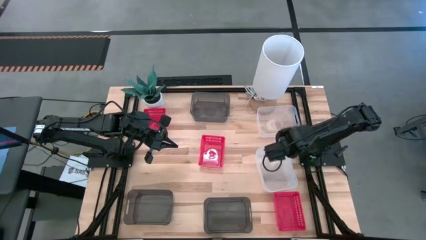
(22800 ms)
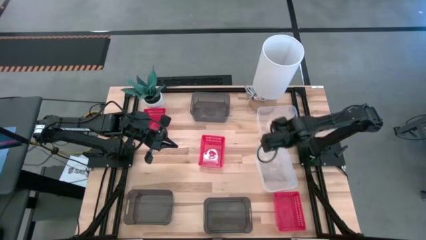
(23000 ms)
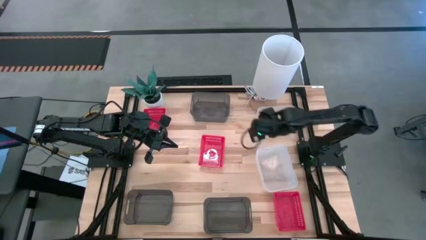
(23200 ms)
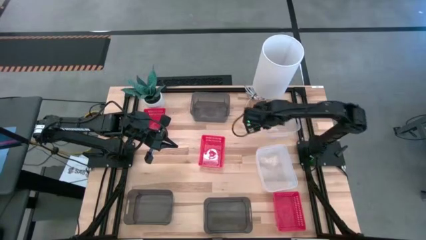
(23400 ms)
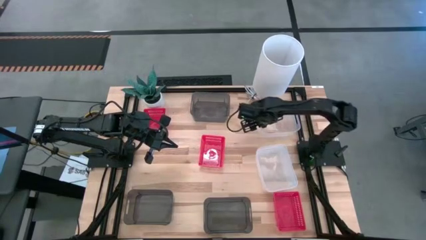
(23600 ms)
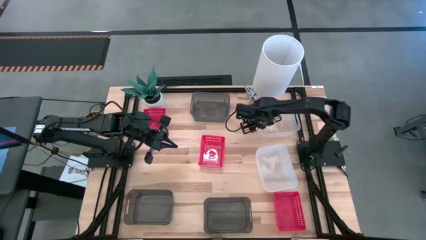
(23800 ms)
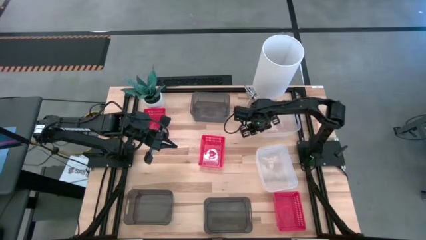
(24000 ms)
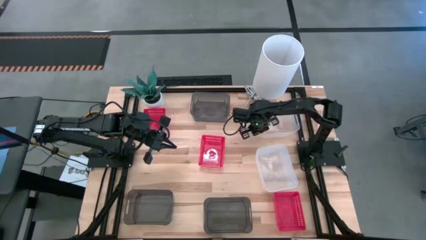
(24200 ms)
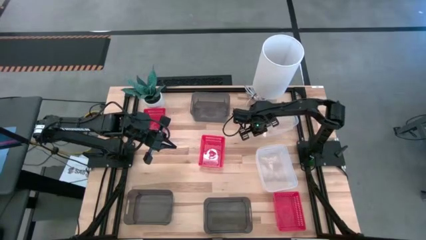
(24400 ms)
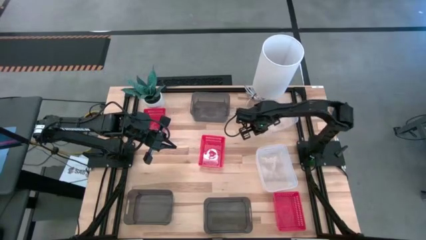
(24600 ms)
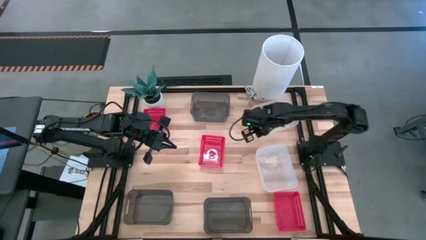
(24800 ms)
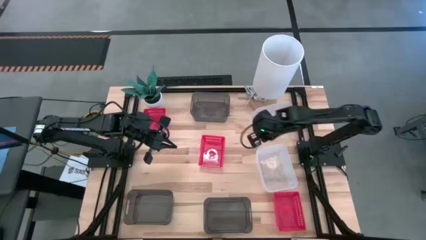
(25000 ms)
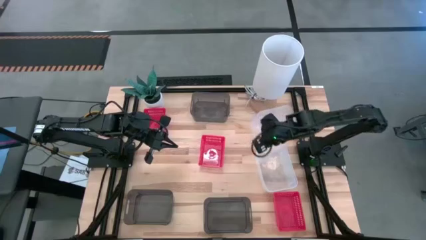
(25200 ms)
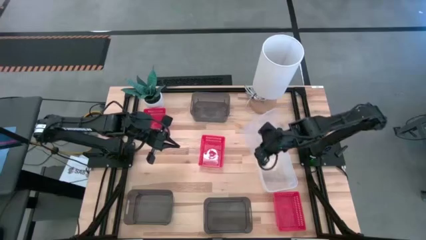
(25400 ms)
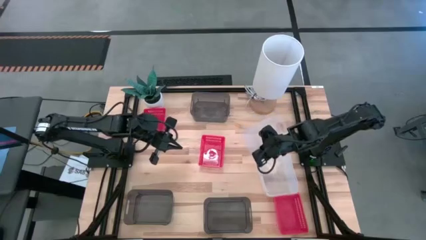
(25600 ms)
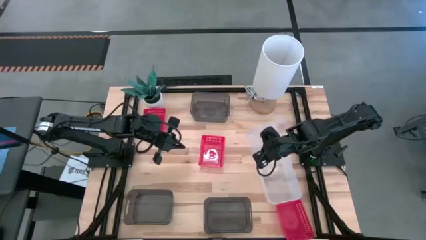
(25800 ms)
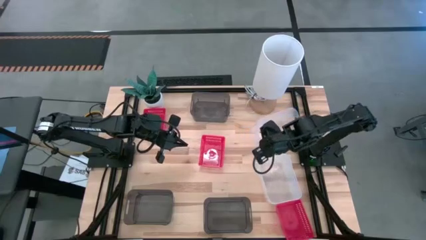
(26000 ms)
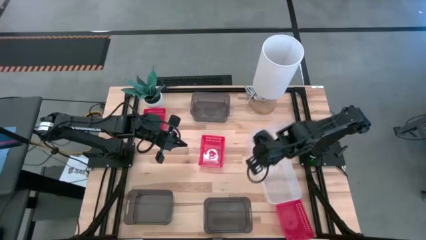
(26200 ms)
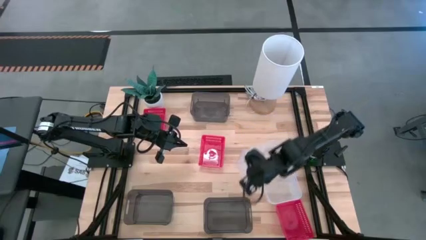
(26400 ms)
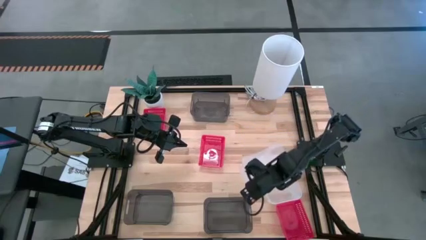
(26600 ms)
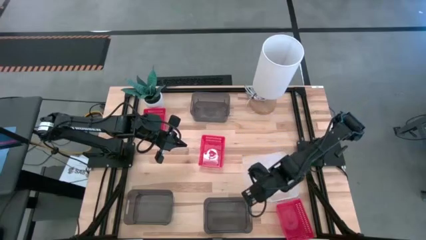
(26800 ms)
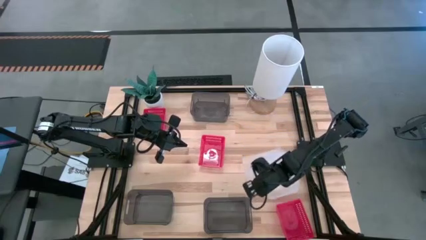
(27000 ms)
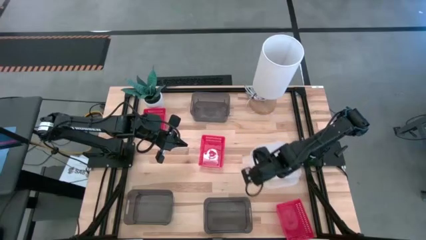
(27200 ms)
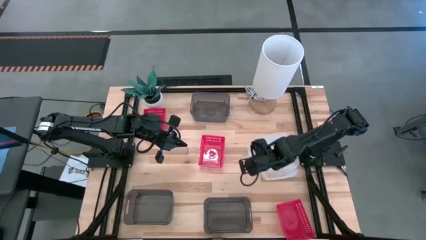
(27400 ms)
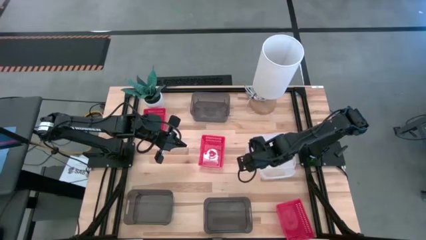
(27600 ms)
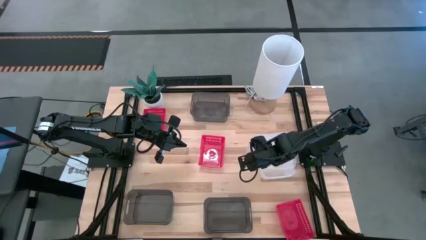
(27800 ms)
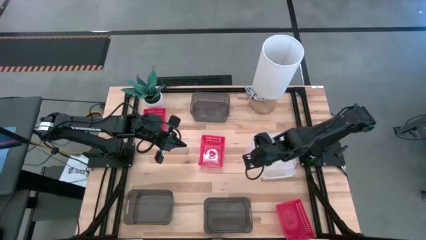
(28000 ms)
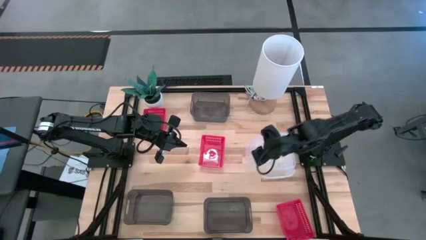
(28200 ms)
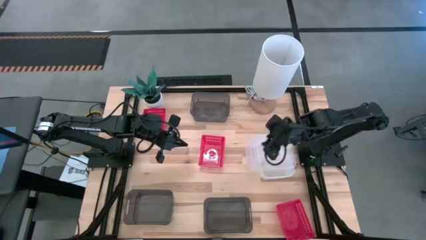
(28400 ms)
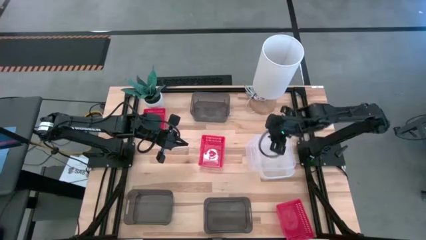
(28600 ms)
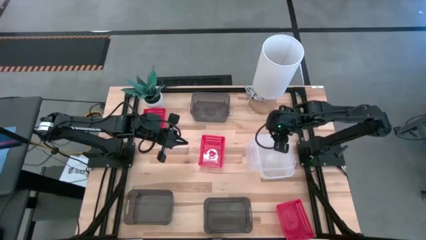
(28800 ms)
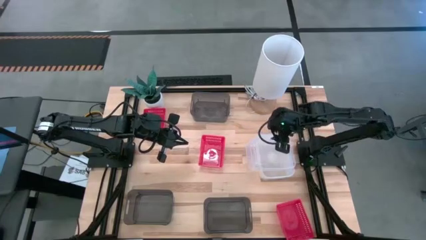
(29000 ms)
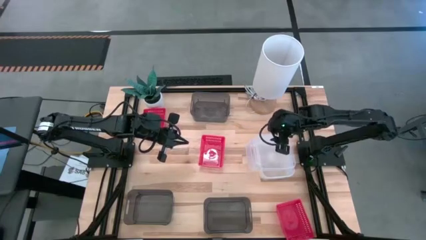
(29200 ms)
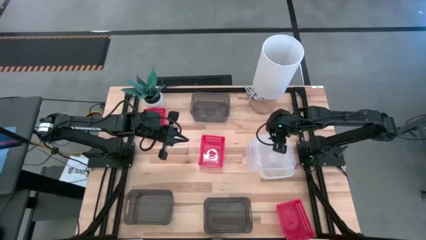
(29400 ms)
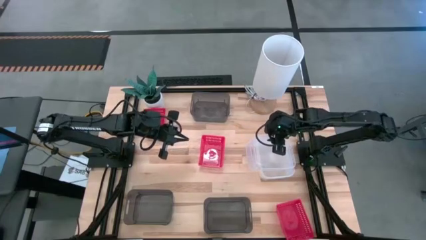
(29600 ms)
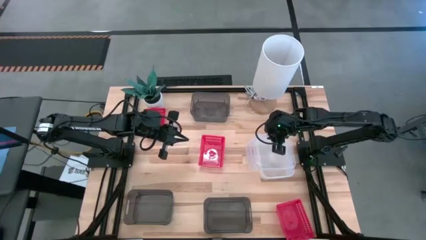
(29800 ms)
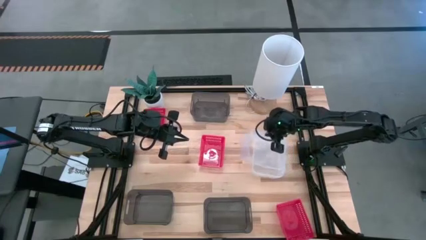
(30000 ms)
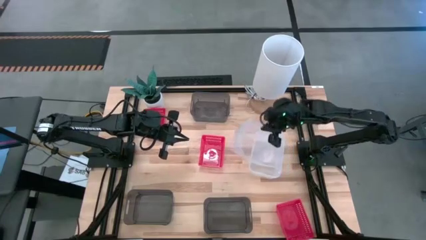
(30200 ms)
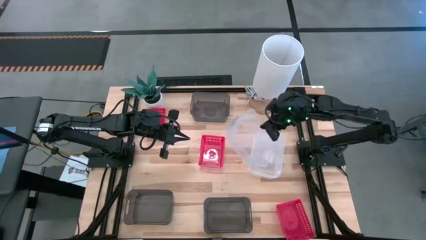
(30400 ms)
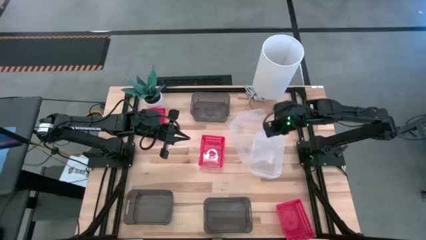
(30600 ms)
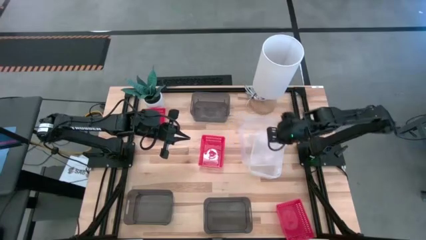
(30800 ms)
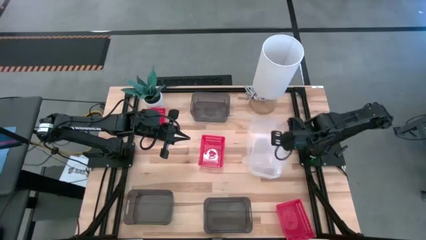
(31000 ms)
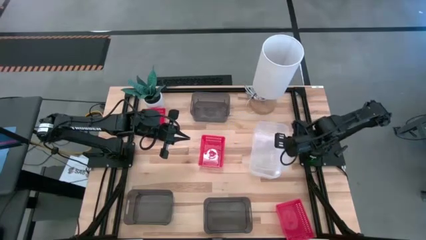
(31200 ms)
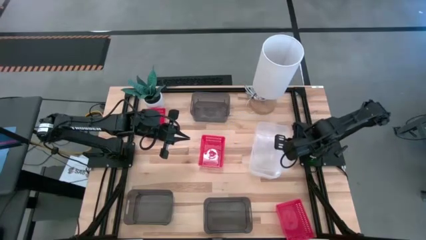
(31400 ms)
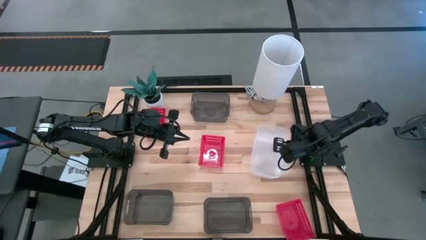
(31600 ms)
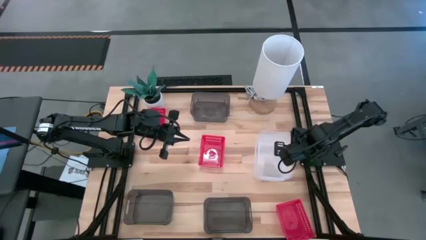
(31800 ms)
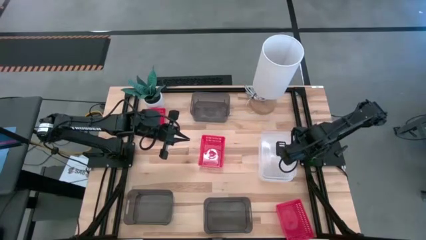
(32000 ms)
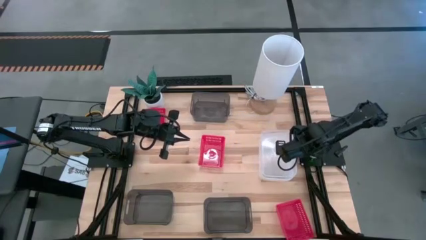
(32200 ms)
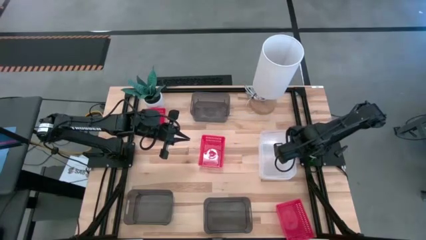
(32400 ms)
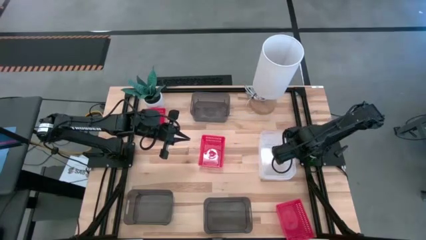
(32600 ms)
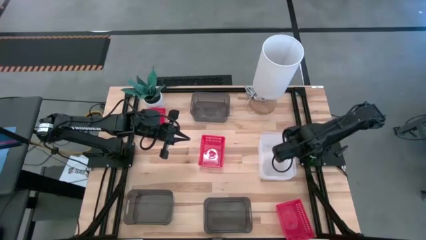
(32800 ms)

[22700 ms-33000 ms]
Stack the top transparent bin on top of the bottom transparent bin
